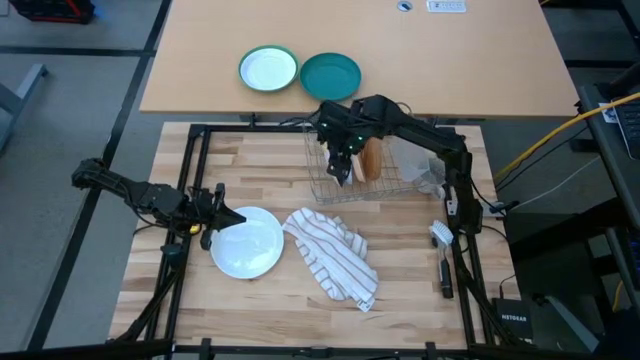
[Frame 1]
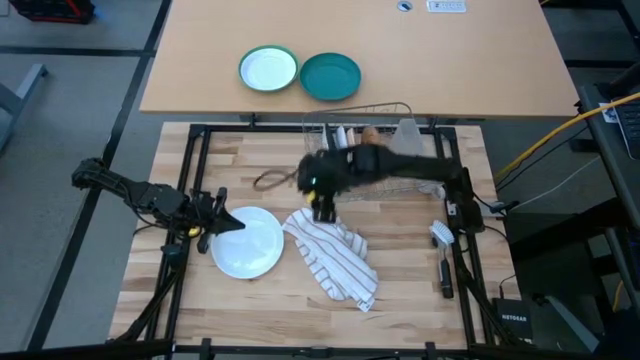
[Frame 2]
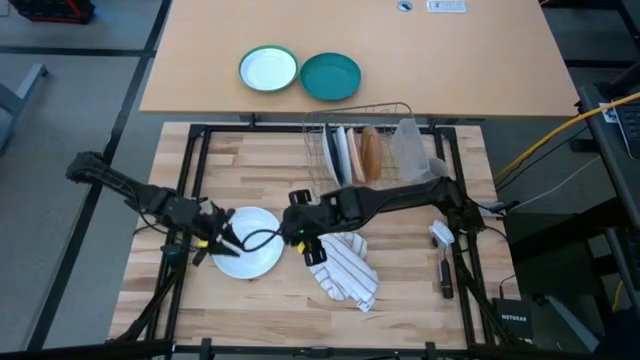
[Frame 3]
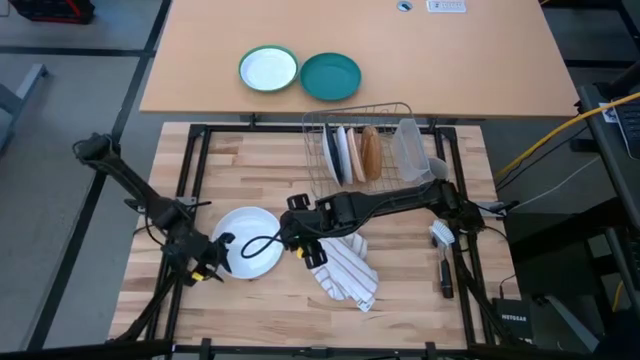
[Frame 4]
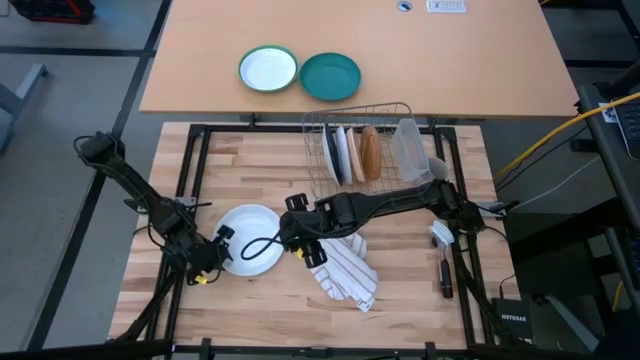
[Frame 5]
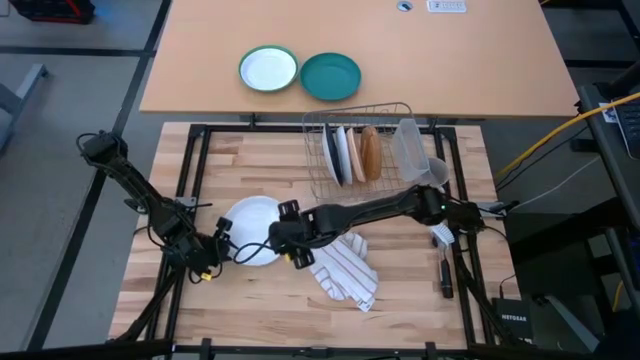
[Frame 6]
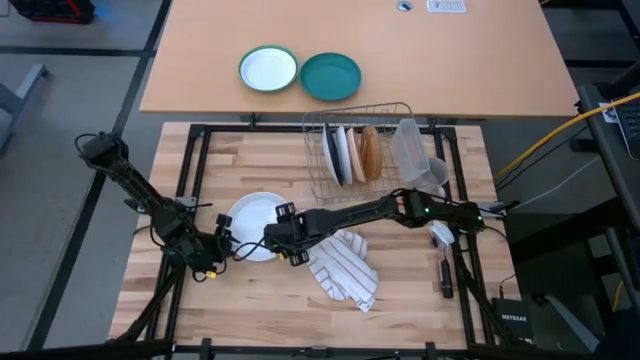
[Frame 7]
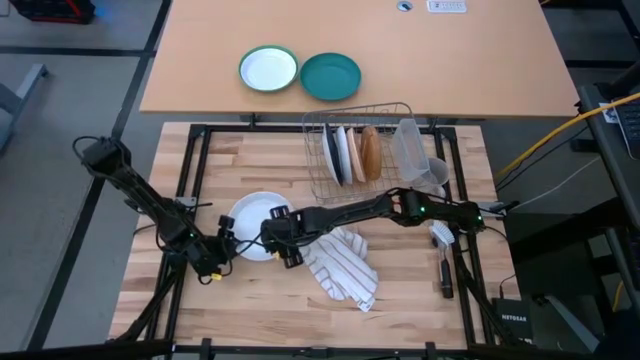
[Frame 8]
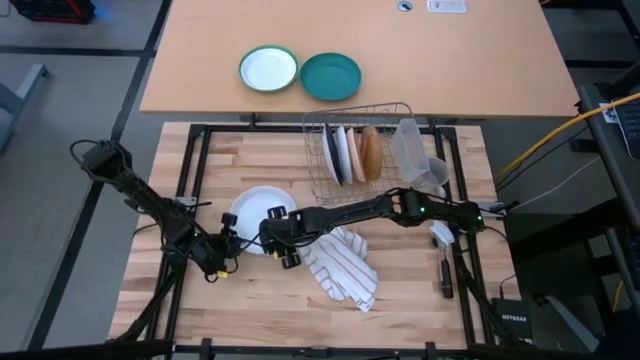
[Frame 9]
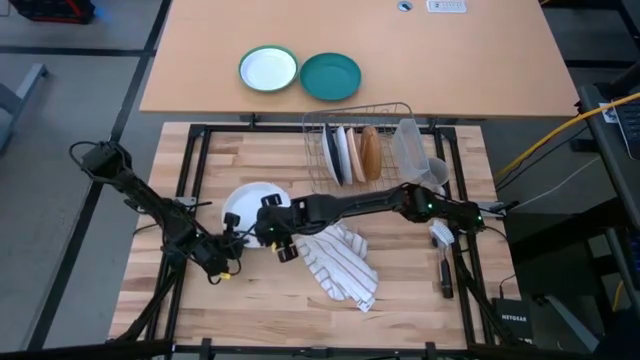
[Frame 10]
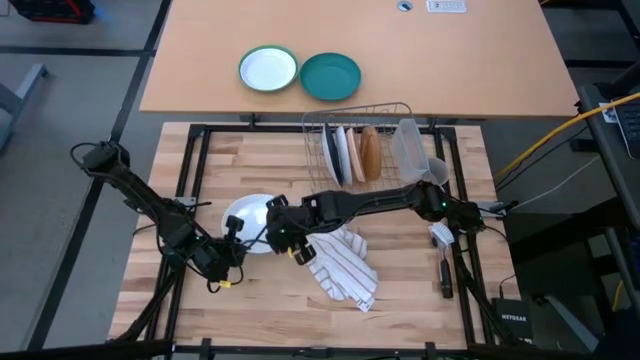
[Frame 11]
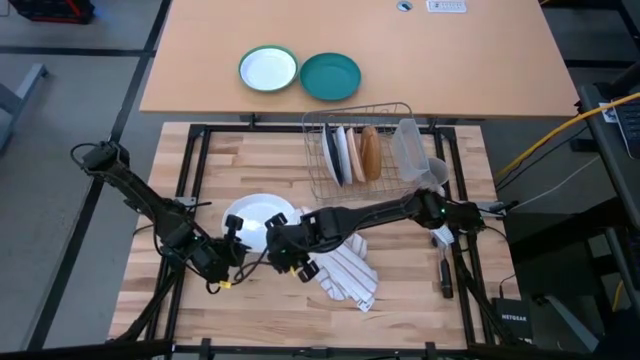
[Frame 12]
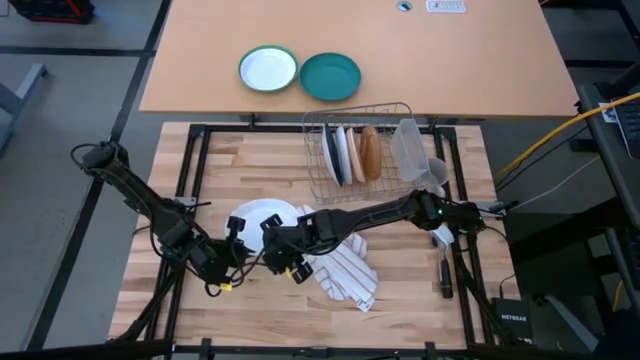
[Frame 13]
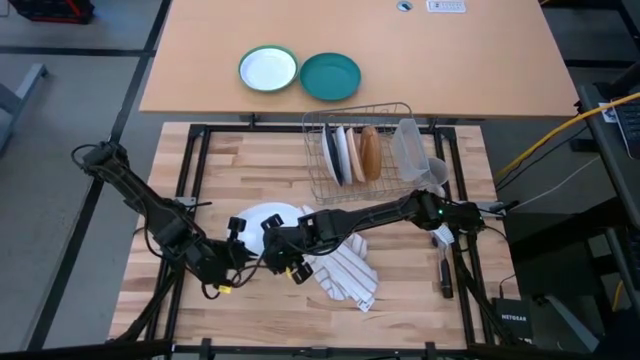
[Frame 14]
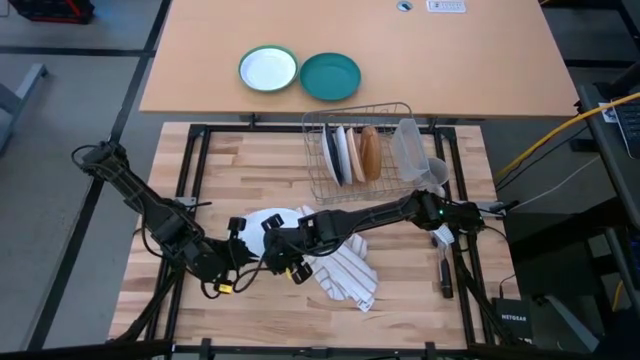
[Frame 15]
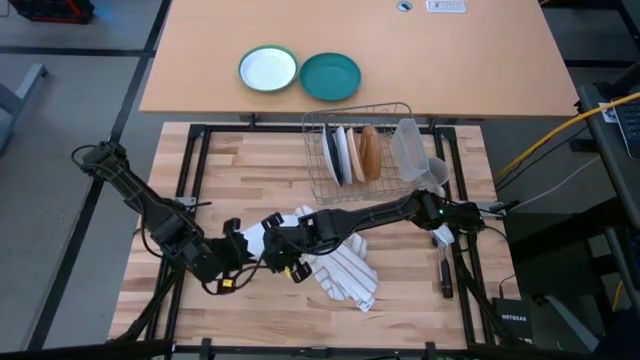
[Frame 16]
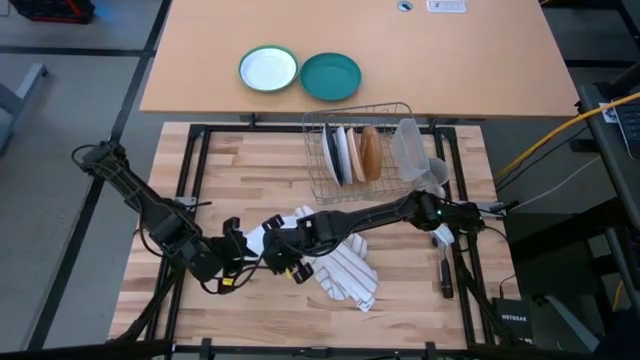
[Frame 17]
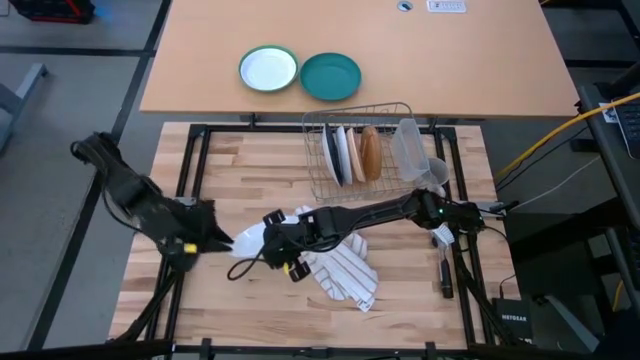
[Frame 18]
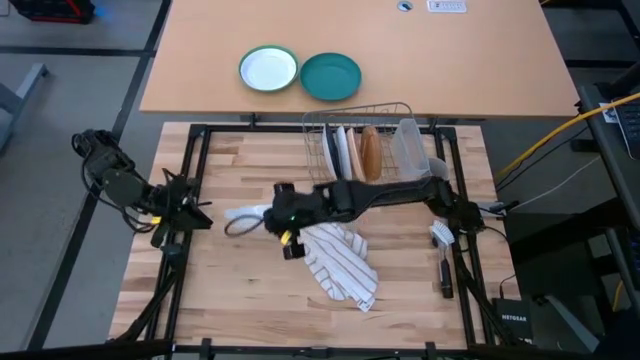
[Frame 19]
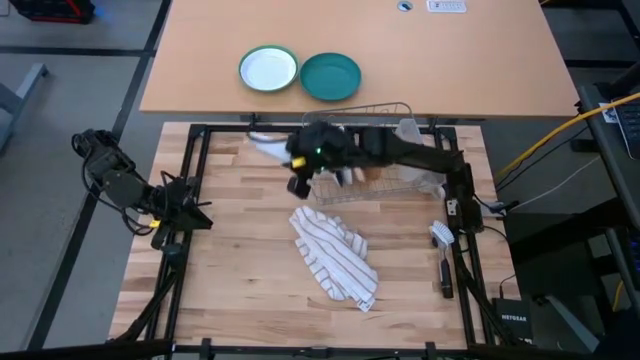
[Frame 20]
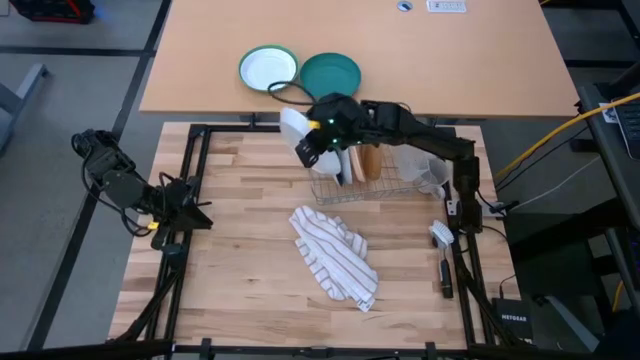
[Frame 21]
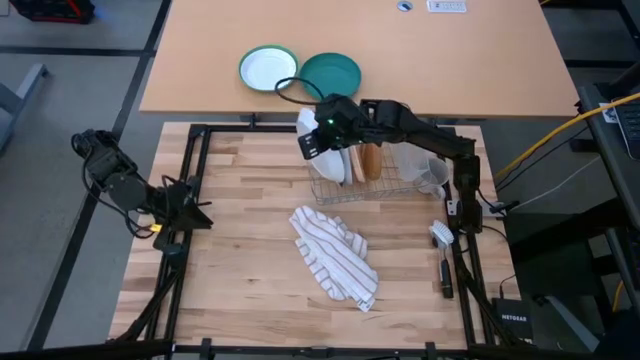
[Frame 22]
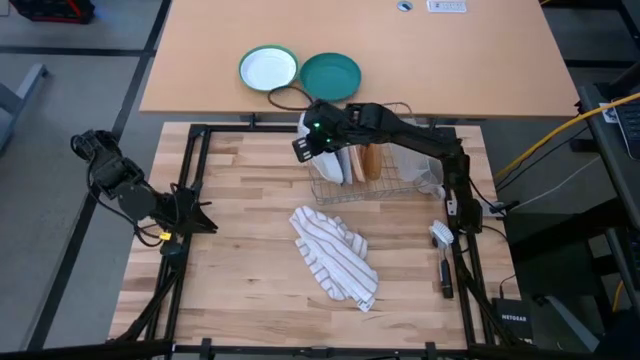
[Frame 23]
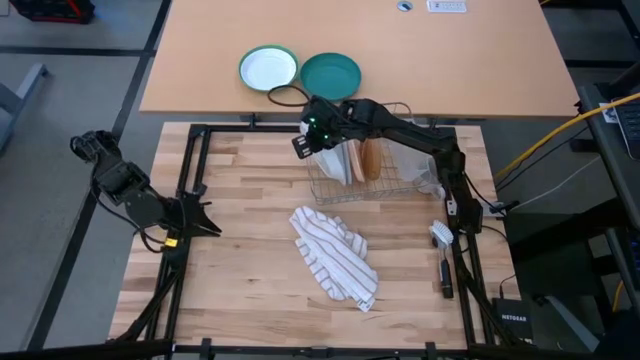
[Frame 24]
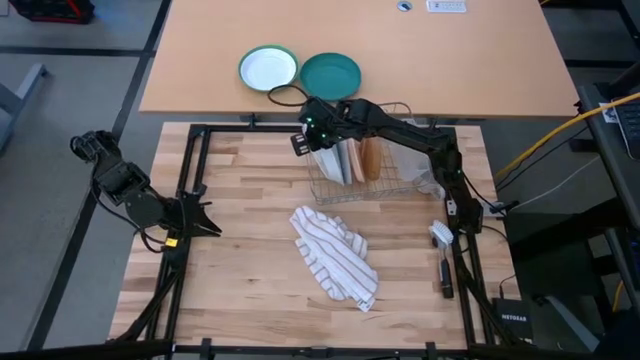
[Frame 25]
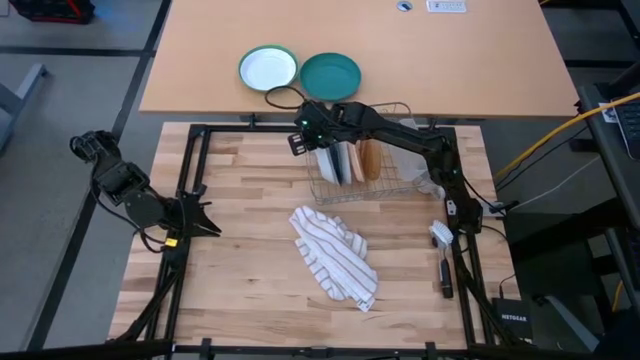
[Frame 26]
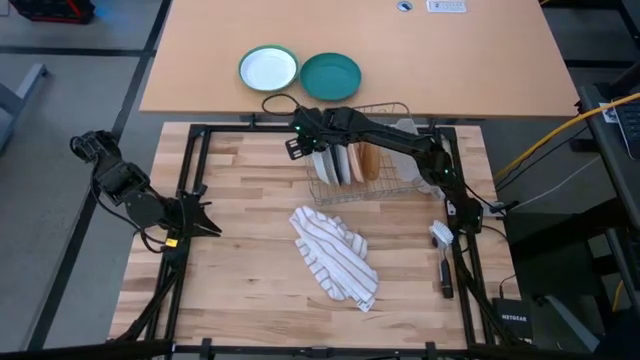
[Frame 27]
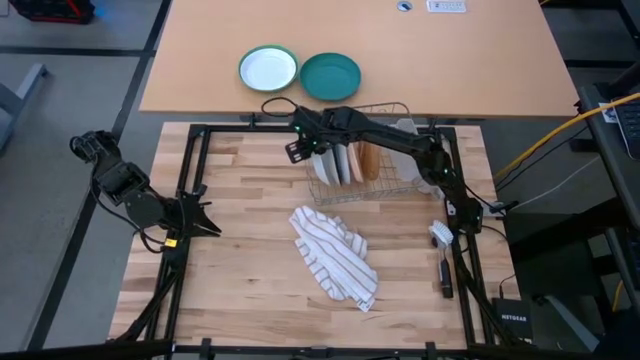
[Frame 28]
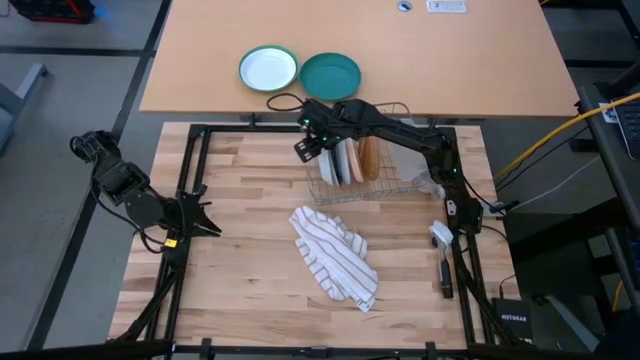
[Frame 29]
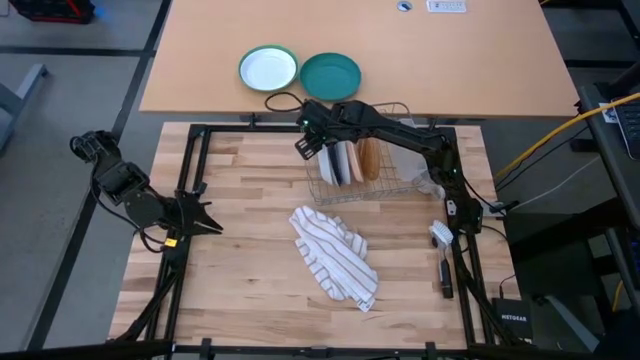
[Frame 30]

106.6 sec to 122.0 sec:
Task: Sort dishes
Put the white plate into the dish rack

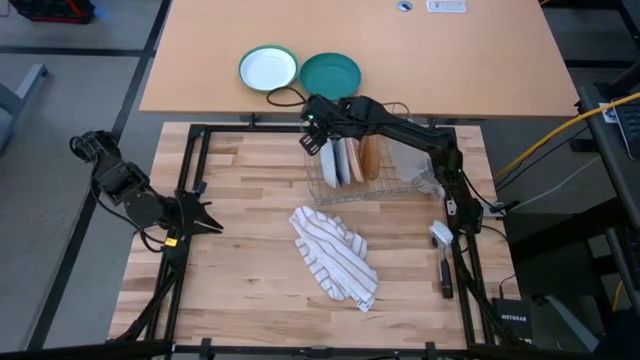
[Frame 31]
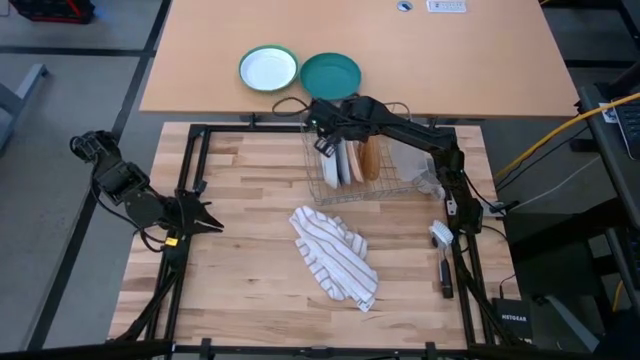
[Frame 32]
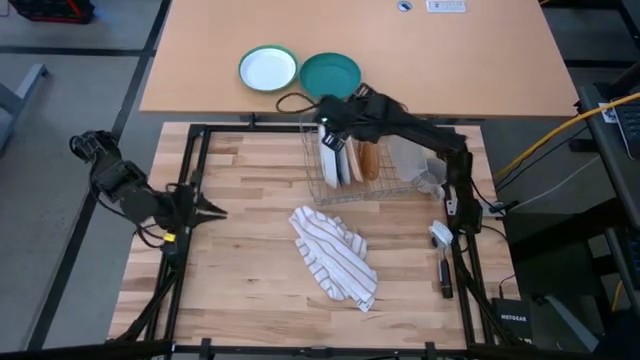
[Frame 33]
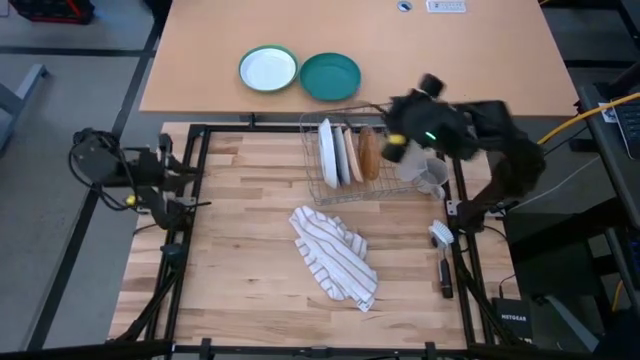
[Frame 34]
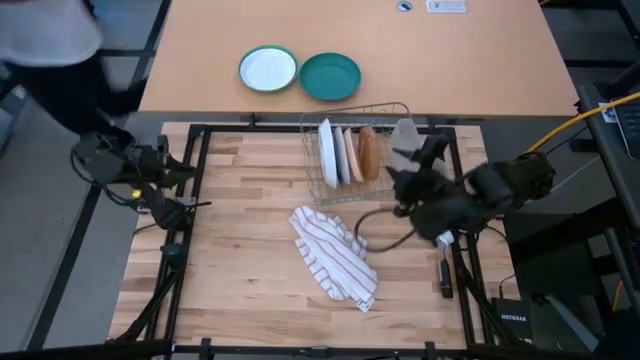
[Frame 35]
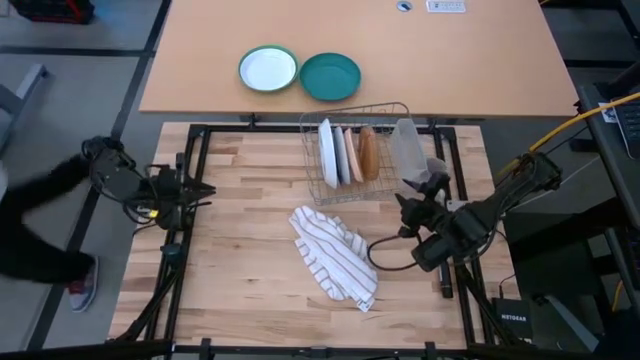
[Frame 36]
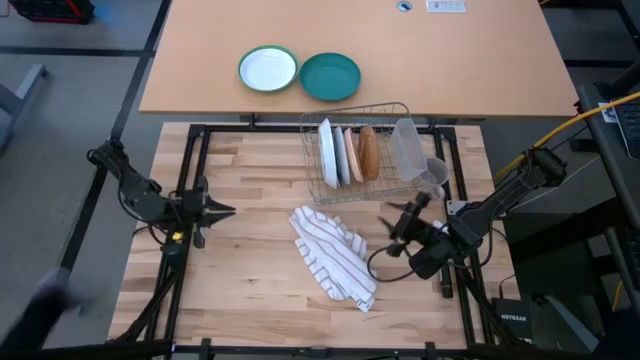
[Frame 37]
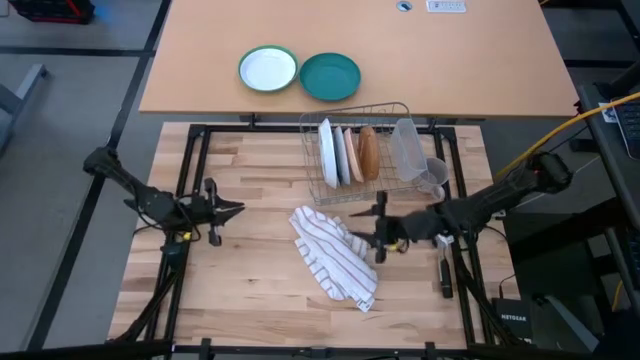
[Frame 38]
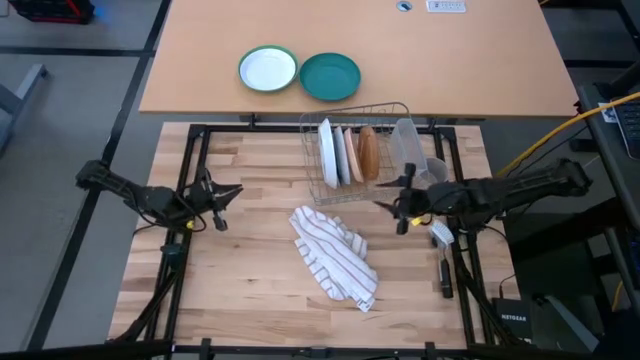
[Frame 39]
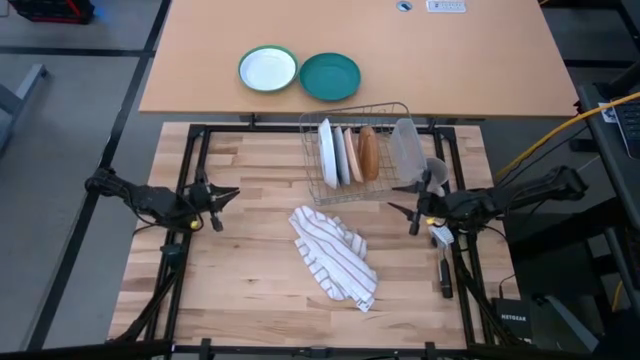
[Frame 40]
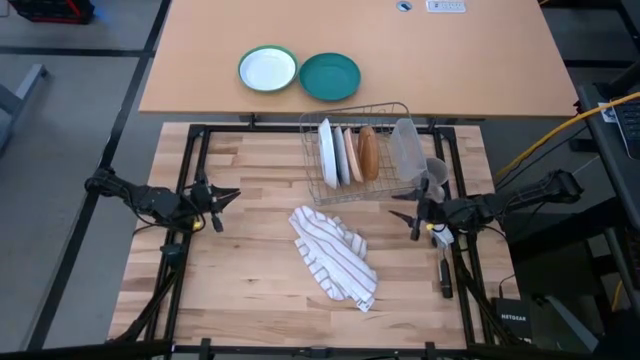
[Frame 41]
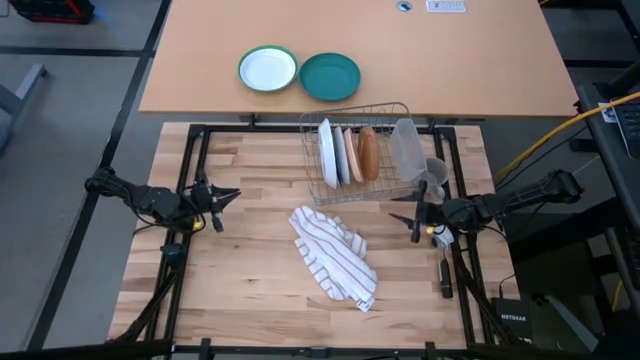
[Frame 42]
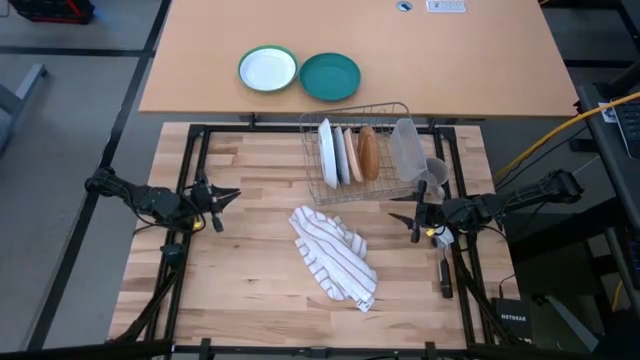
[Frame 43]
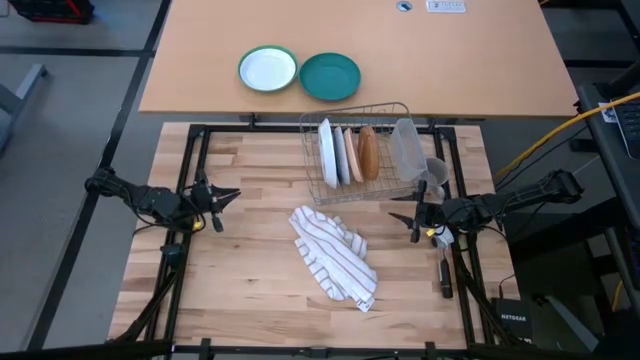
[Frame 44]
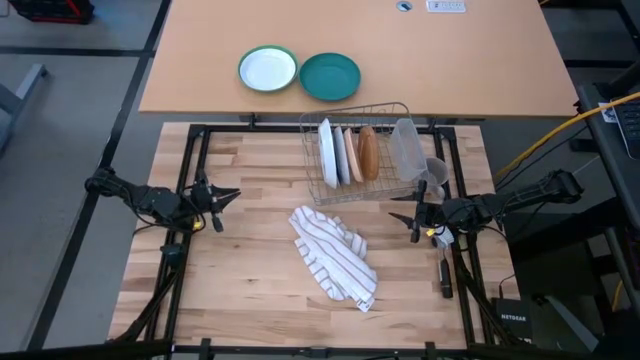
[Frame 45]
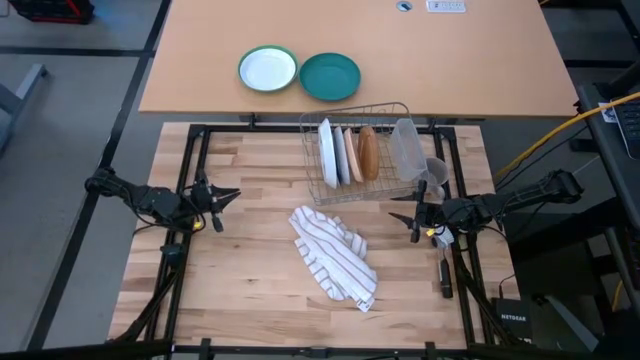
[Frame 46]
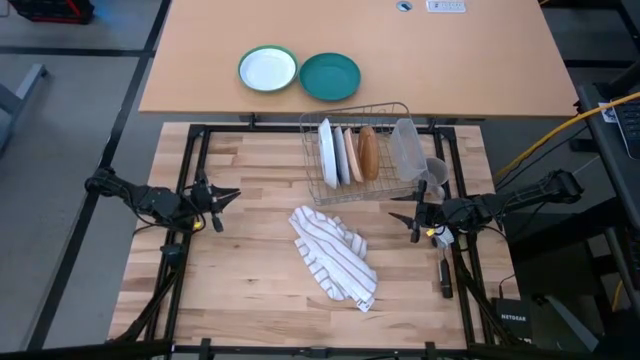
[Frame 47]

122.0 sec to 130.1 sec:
Return to Home Position
